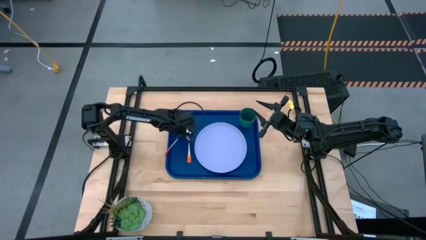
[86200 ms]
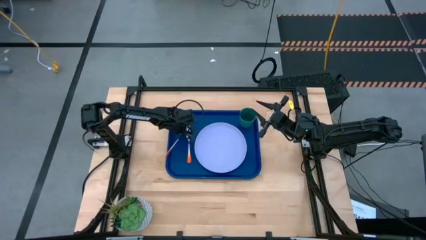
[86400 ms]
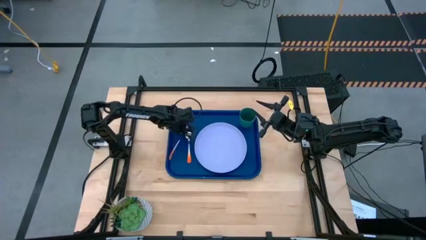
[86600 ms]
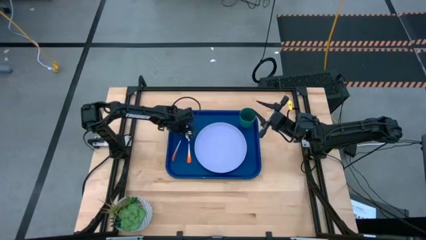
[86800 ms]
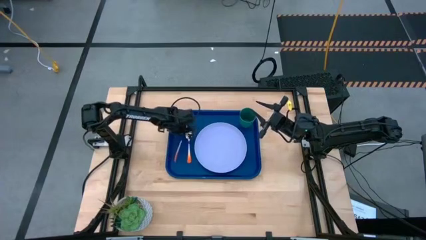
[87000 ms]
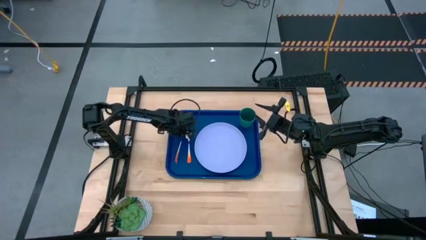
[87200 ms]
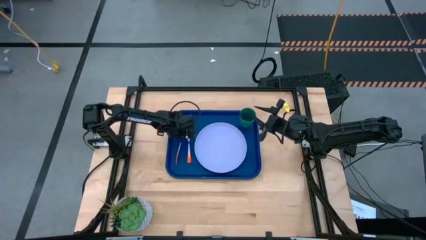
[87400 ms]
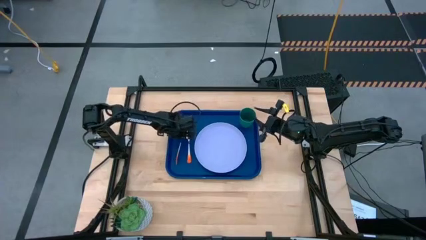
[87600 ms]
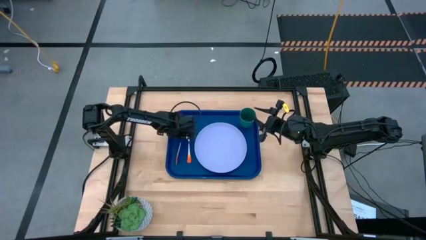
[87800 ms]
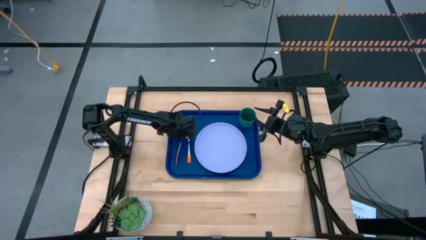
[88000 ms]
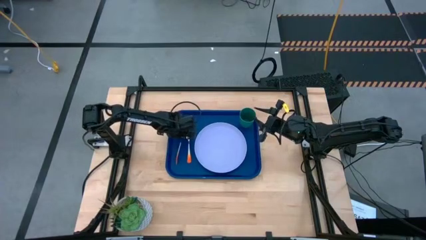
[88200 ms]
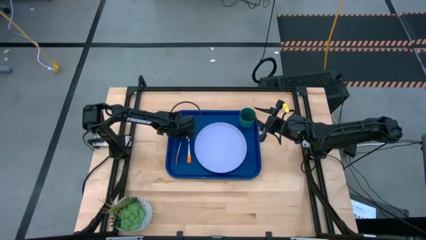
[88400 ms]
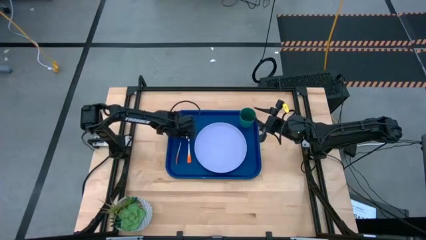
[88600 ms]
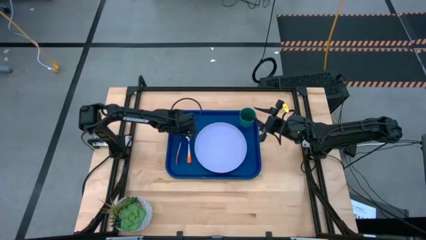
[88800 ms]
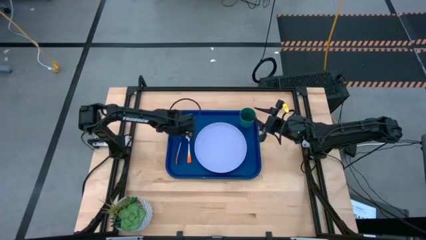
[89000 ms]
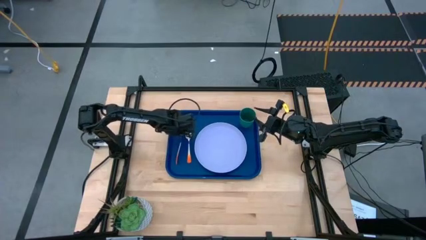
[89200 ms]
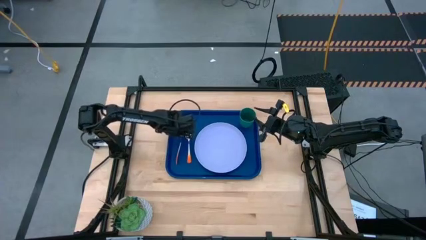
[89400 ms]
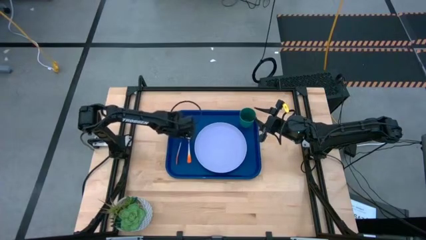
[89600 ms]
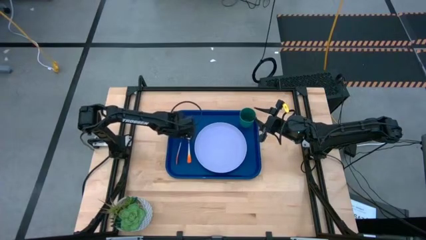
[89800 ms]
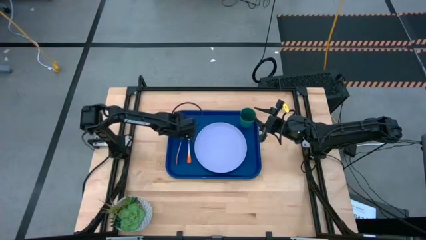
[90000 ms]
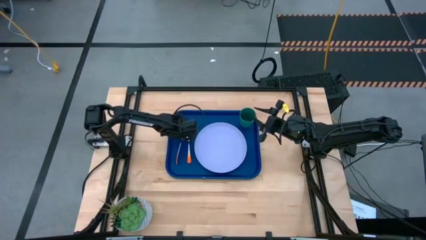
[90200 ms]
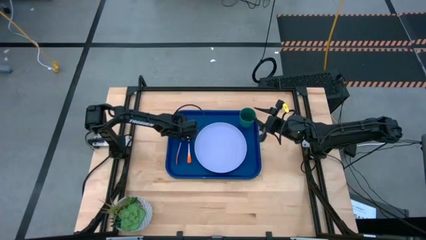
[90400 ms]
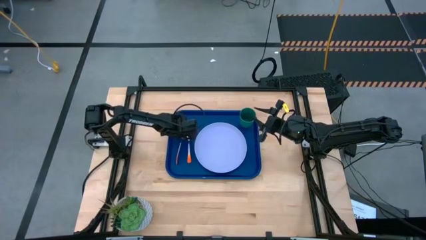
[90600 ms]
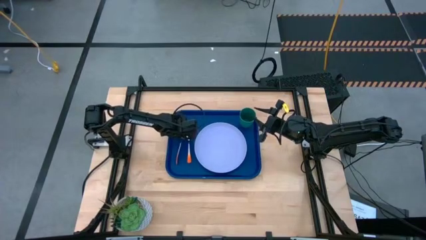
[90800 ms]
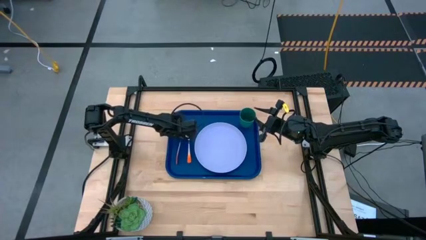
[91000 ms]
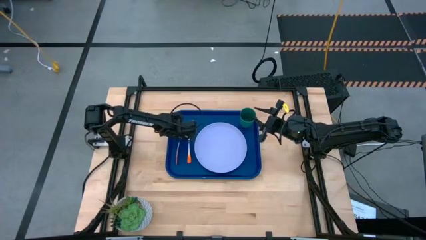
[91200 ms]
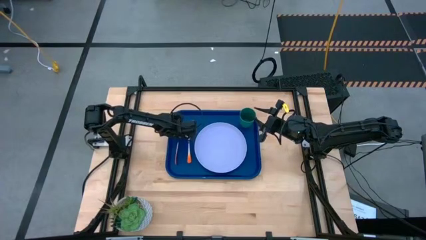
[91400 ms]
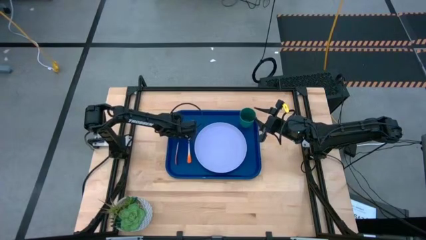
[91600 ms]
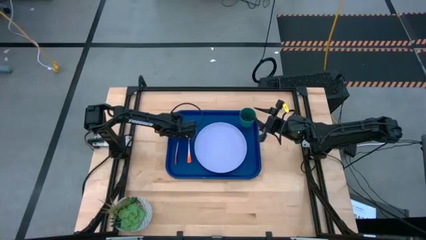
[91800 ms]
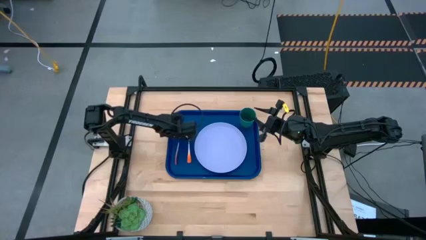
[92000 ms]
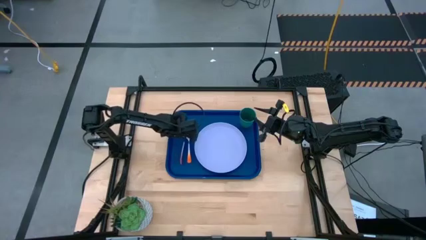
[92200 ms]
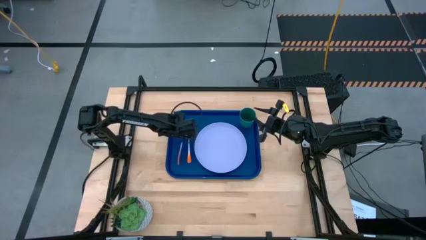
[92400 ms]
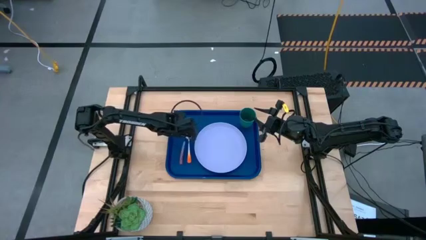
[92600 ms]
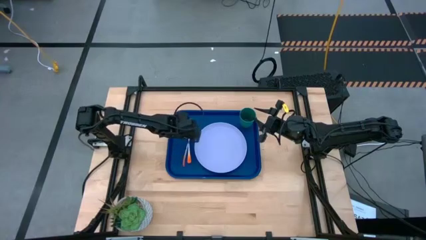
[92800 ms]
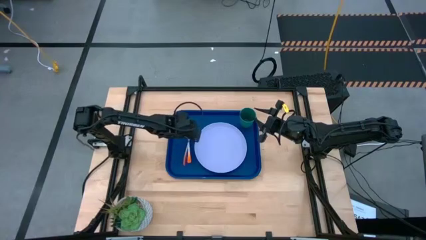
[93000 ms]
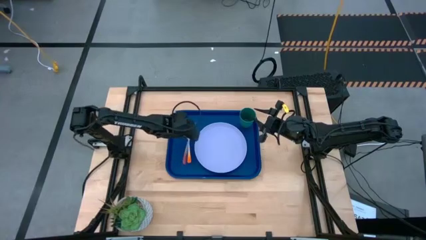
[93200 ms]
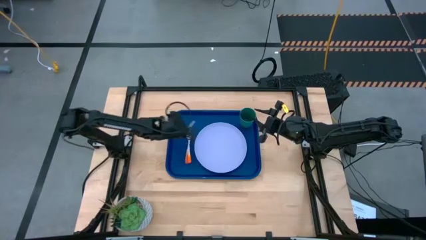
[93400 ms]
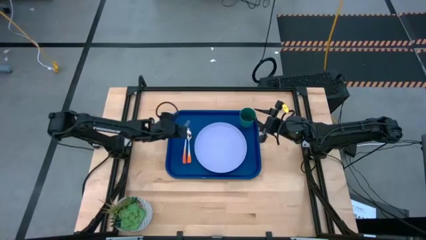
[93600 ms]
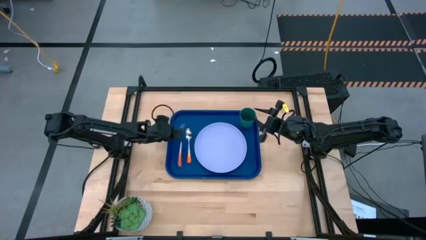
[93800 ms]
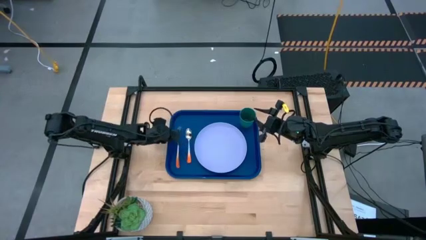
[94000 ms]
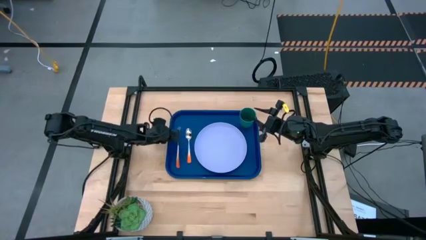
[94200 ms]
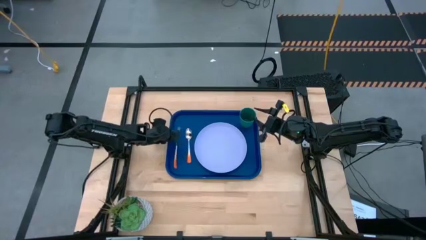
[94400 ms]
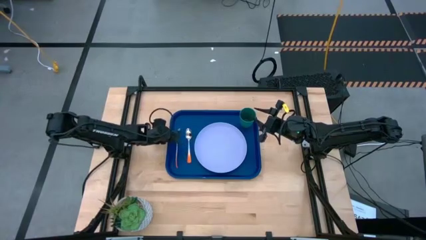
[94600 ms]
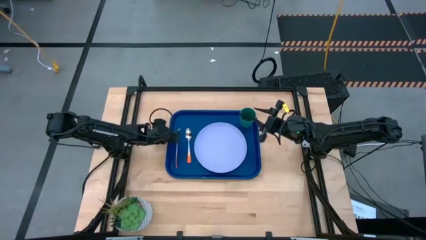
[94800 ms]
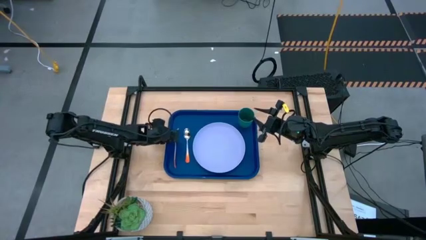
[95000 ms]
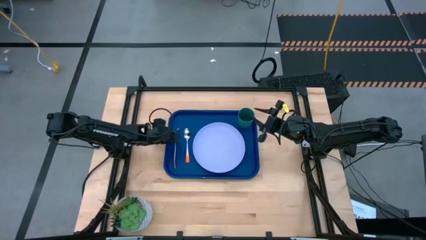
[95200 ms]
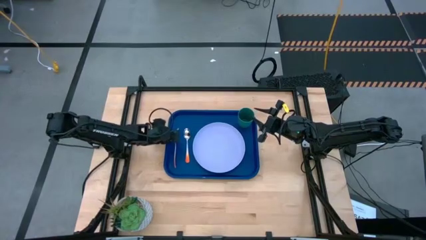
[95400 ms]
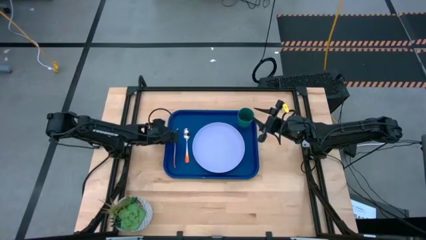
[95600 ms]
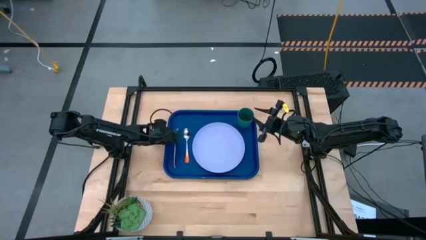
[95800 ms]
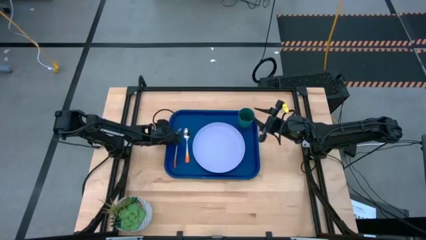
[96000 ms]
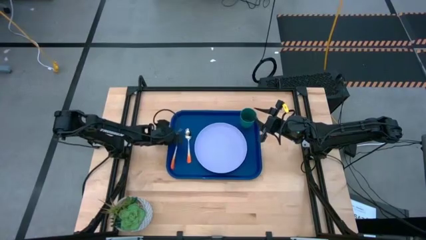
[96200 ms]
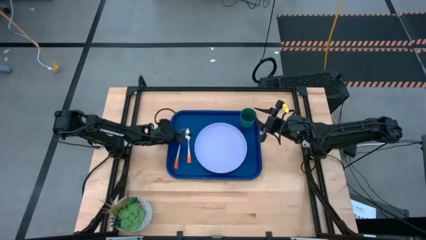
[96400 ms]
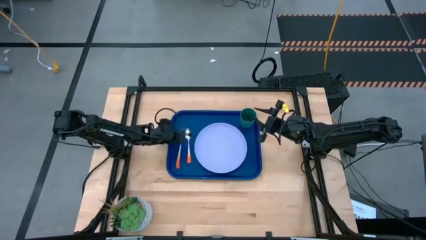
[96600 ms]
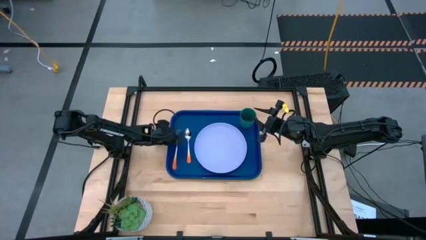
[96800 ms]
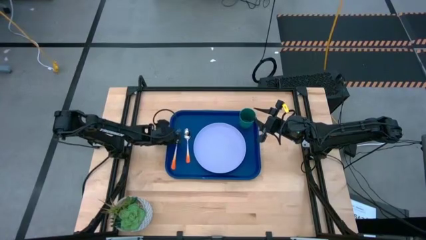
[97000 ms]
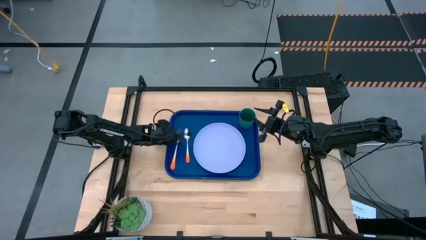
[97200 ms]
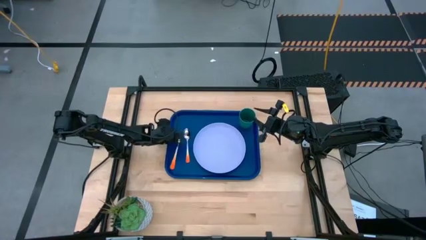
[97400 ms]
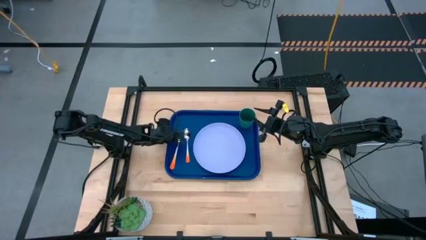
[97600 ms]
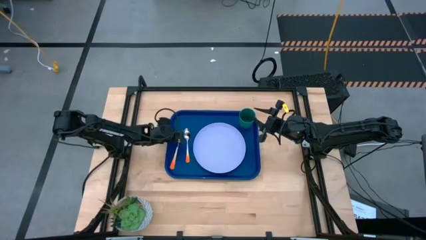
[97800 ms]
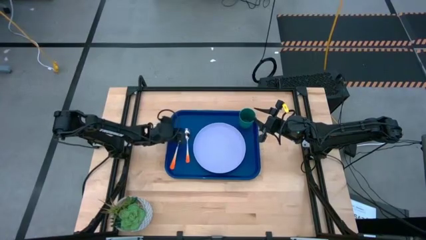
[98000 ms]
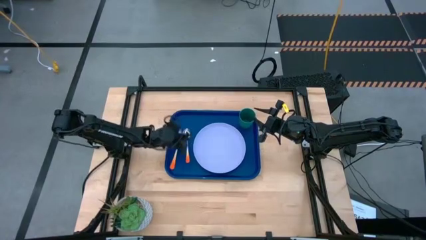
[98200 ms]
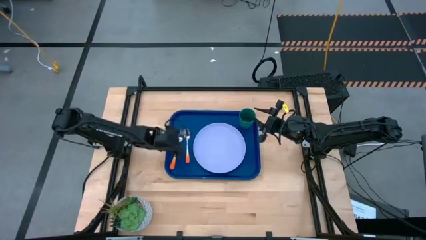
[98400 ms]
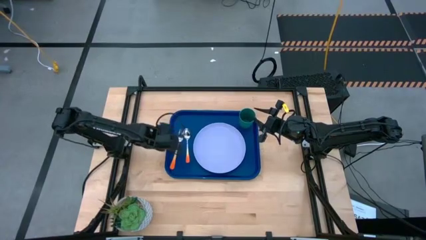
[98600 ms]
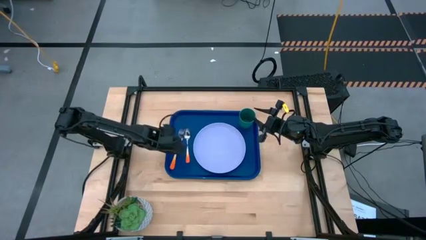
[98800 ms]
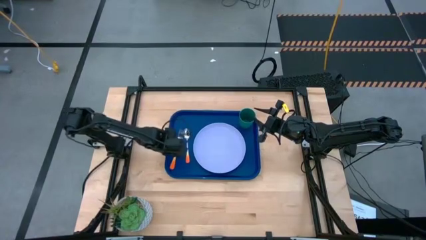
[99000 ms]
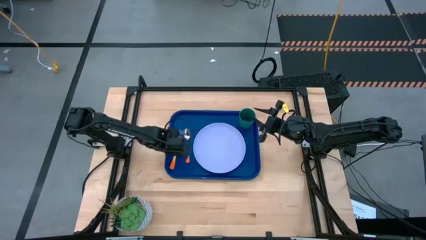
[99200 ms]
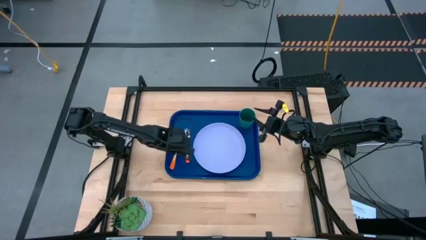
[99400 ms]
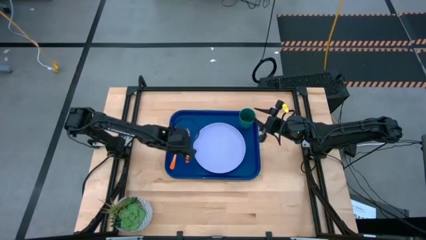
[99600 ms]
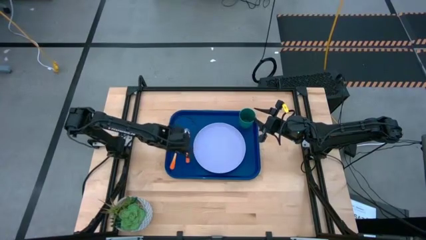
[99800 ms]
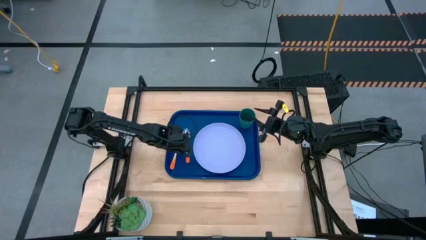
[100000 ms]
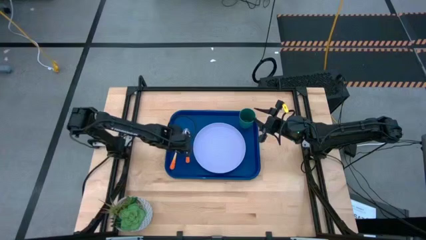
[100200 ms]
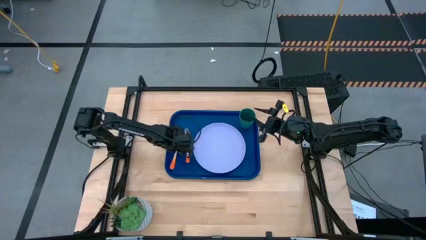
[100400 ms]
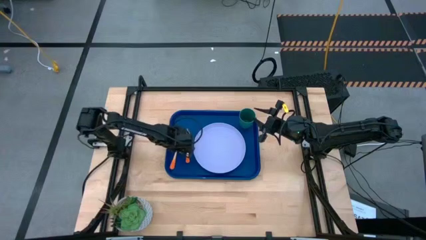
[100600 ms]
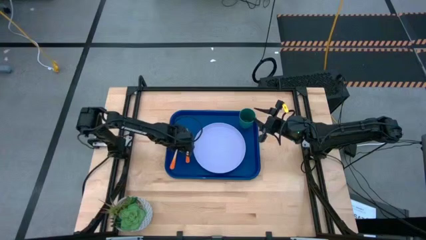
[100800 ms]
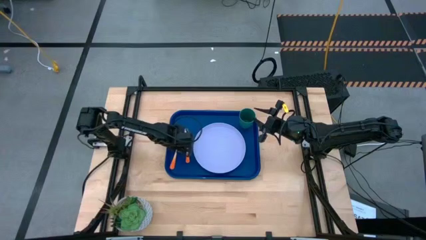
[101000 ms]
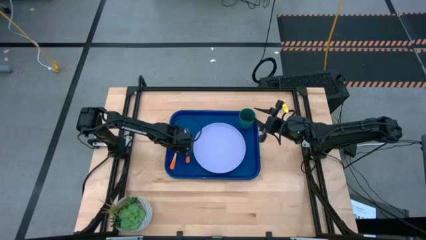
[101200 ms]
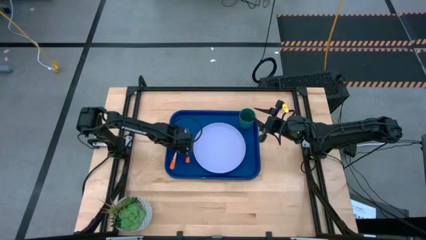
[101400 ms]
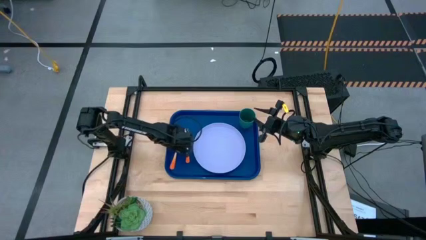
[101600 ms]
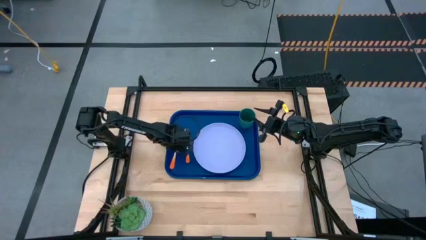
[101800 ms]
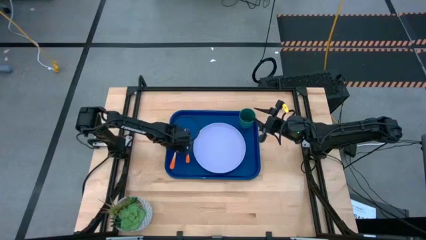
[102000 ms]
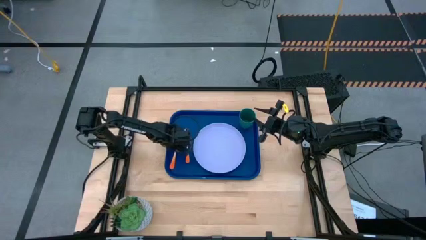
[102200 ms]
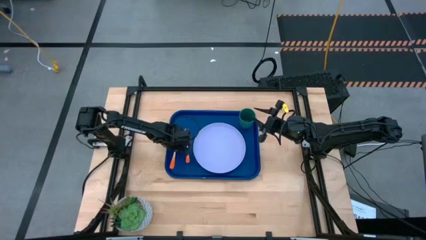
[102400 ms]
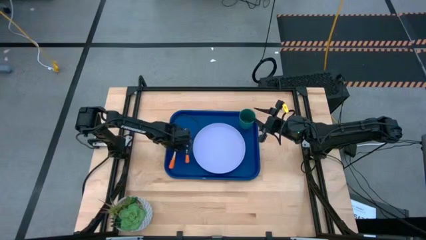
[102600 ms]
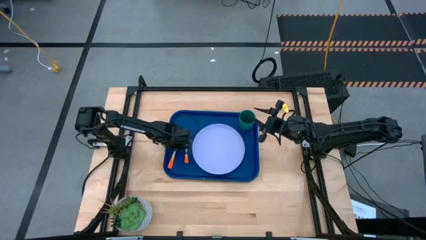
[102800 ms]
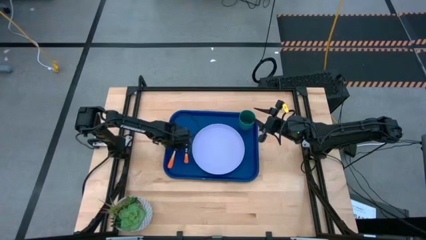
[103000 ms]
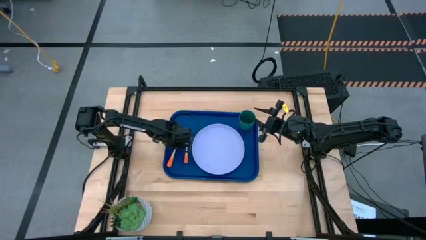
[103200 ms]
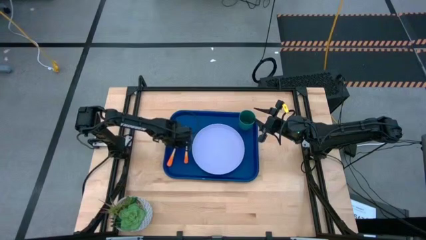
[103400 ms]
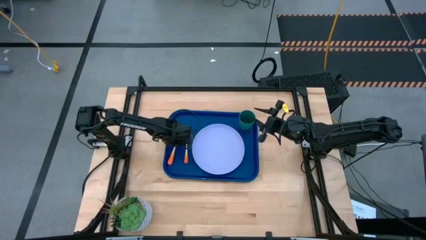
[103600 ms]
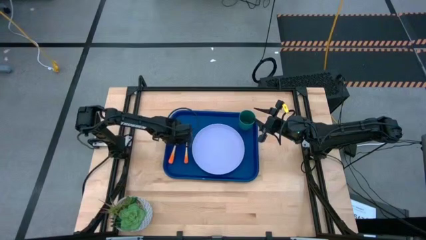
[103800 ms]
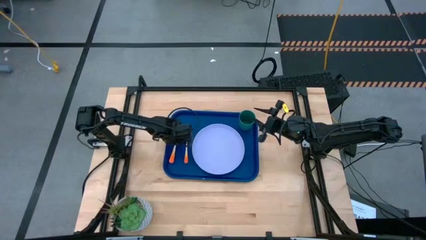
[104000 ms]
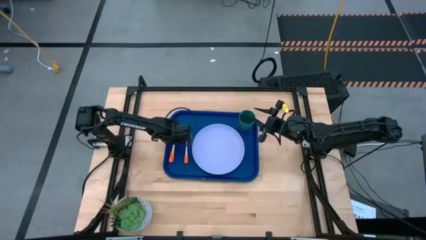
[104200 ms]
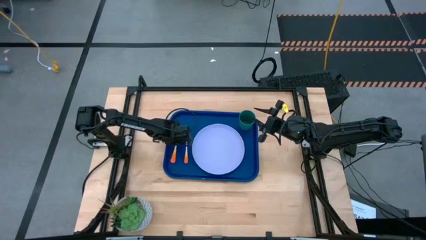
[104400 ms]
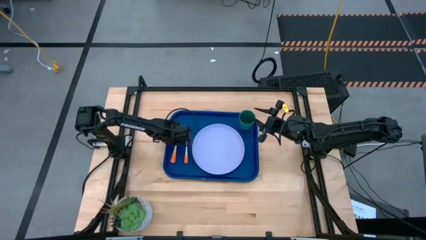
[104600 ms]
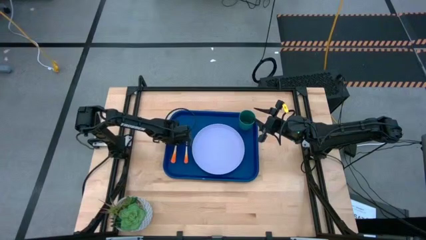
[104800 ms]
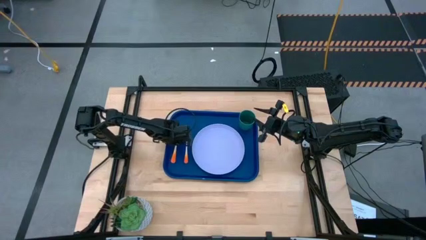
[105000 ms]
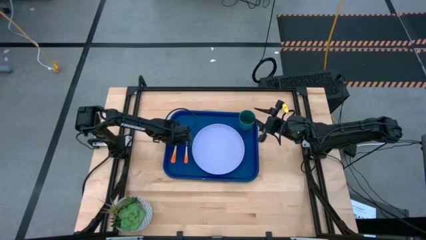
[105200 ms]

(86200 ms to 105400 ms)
Task: Pick and place plate/cup/fork/spoon on tray
Put the orange fork to the left of the orange spoon on the blue serving tray
